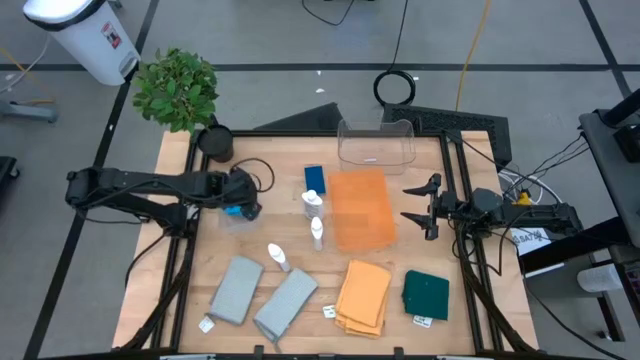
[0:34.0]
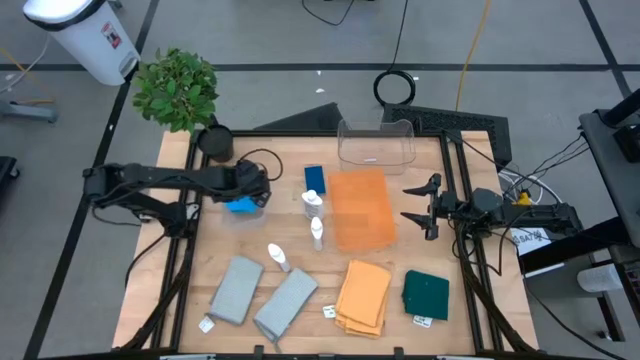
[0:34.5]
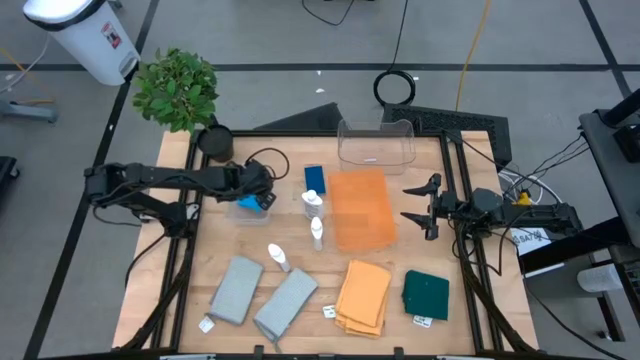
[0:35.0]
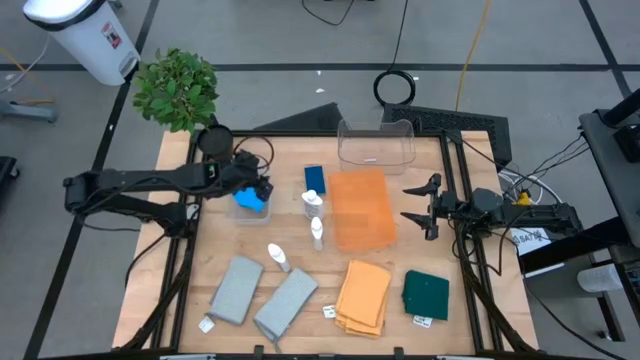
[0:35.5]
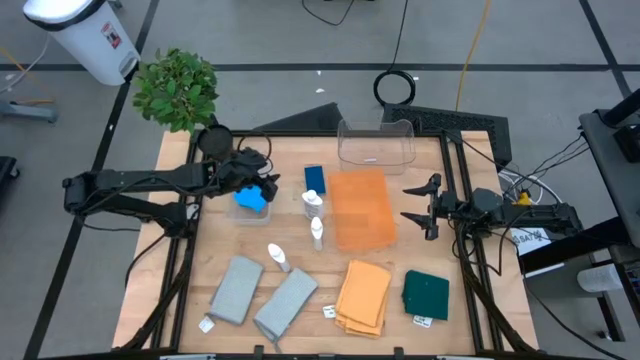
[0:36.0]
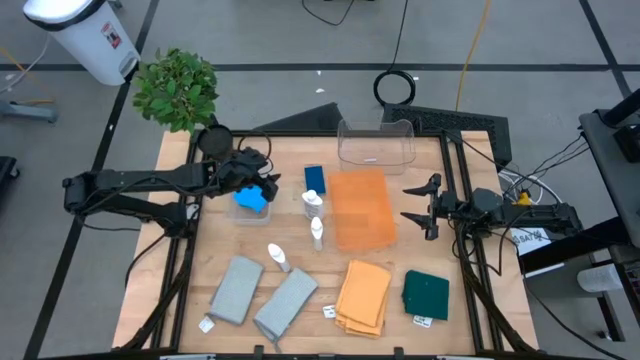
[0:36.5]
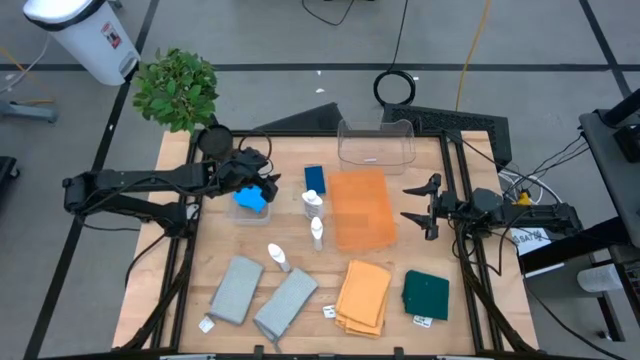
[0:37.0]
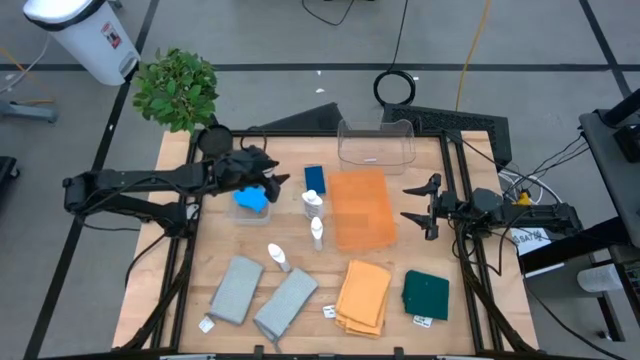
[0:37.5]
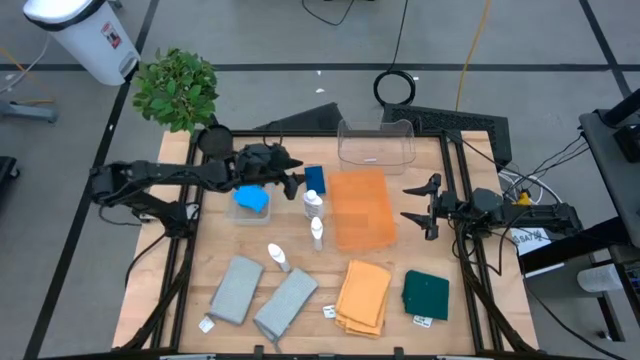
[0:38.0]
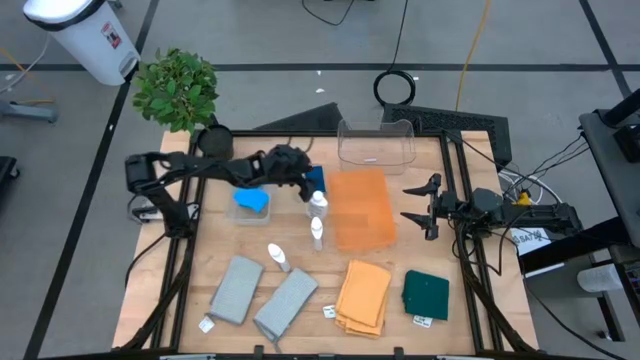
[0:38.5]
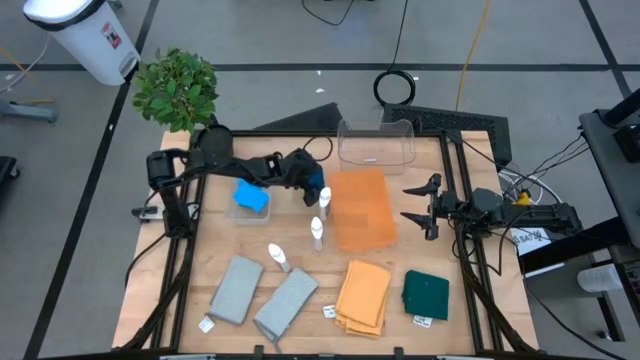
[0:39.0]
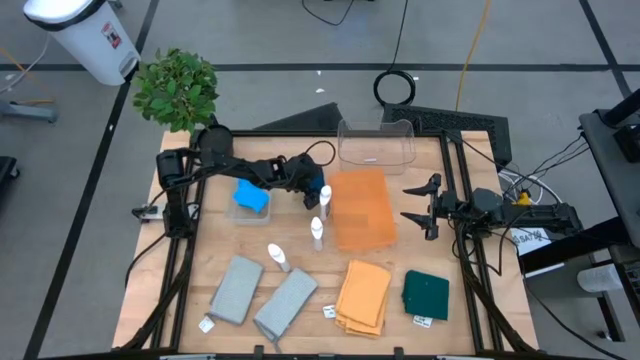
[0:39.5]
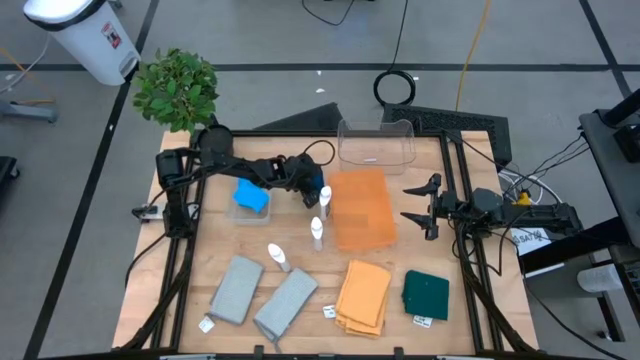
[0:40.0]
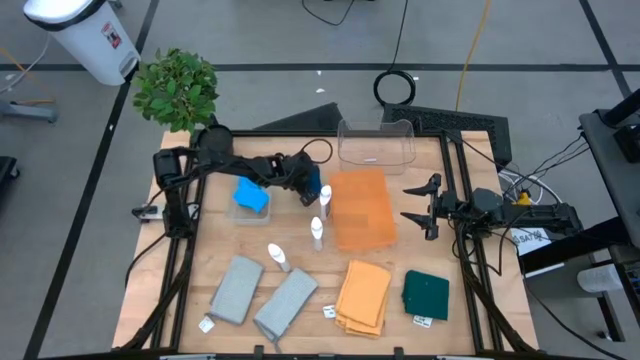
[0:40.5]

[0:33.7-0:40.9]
Task: Pick & Place Kitchen Items
Put the blue sponge into the white bin

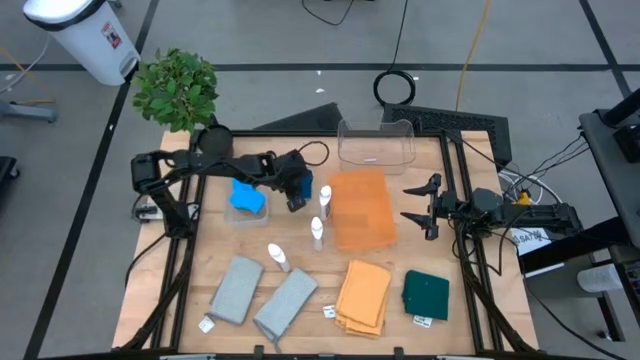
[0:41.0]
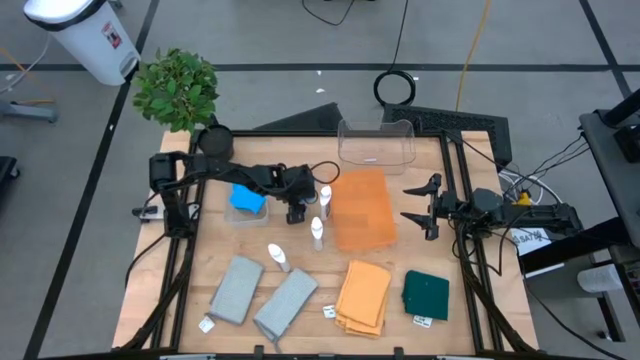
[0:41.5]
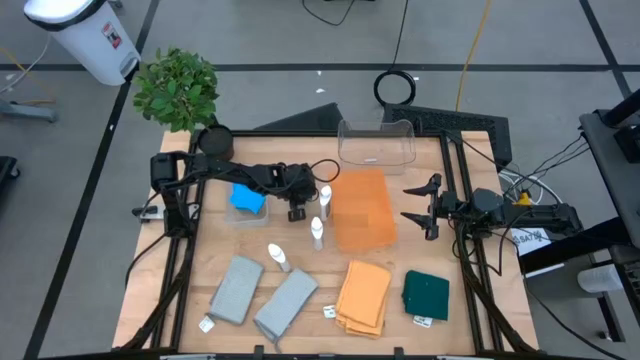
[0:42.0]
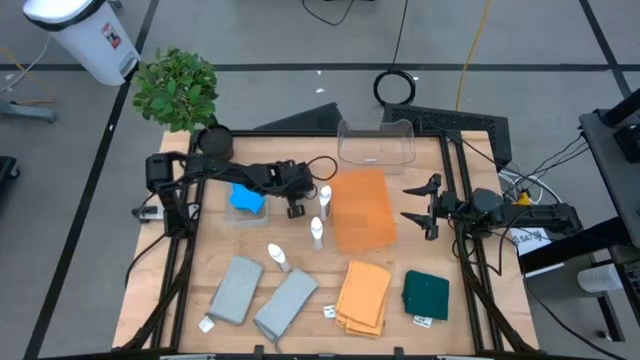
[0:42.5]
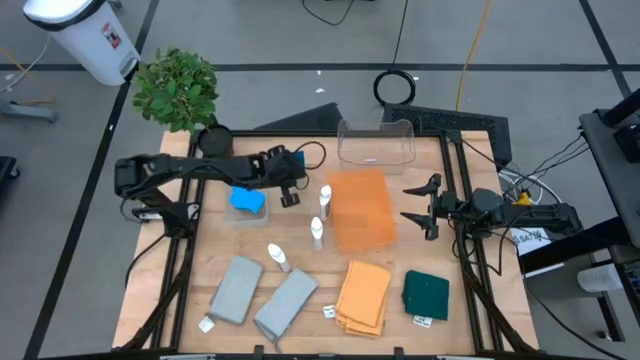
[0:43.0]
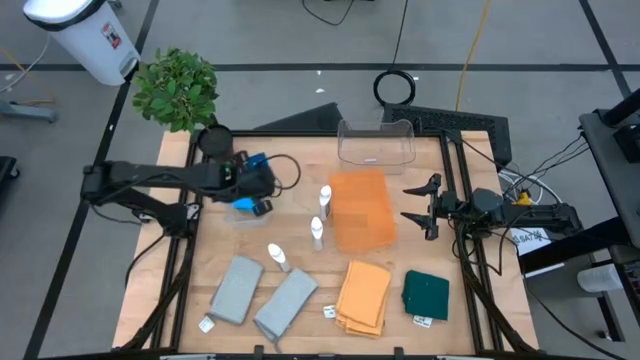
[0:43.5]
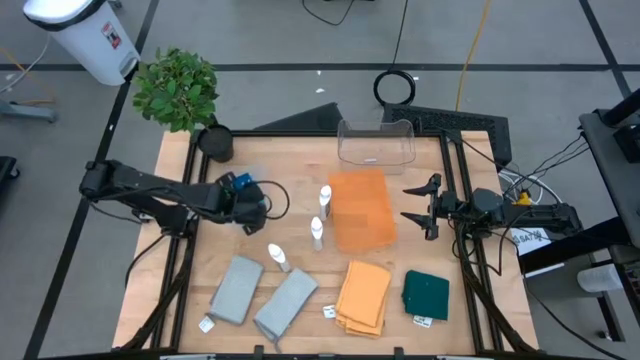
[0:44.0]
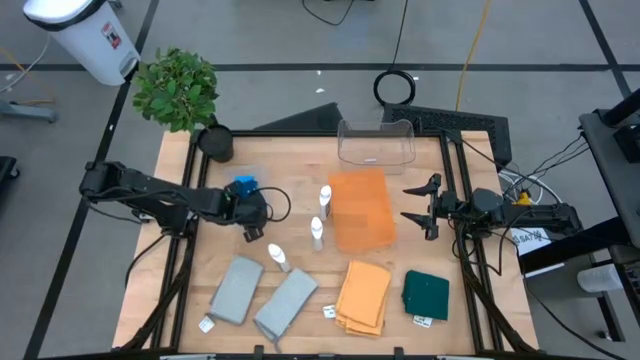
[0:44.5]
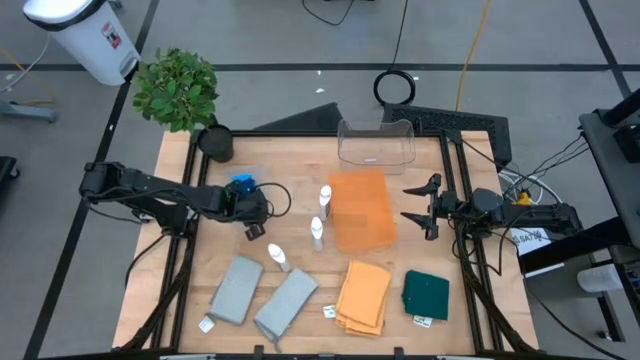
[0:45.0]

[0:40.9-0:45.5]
Put the blue sponge into the white bin

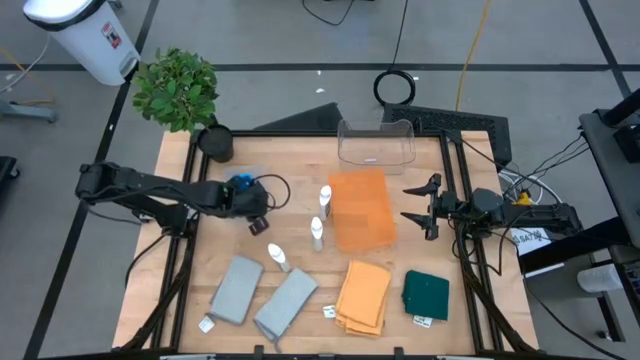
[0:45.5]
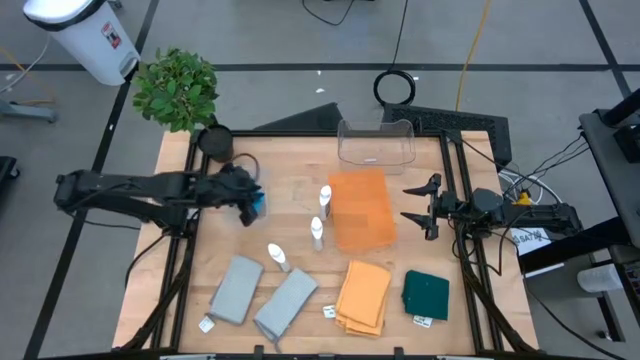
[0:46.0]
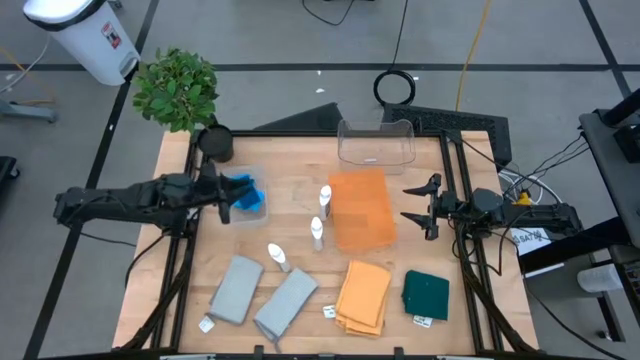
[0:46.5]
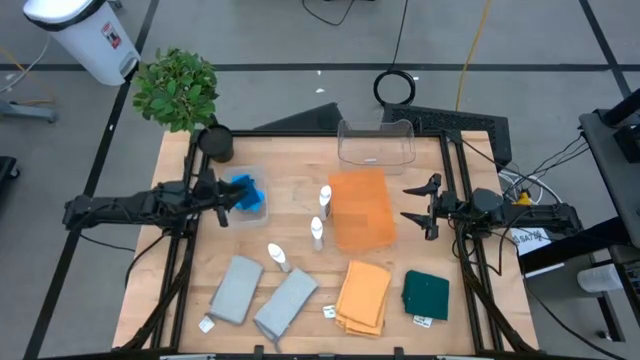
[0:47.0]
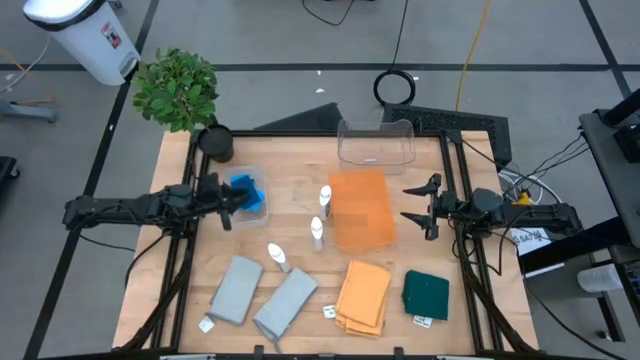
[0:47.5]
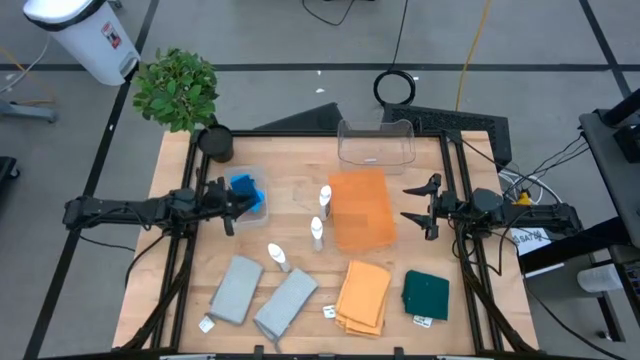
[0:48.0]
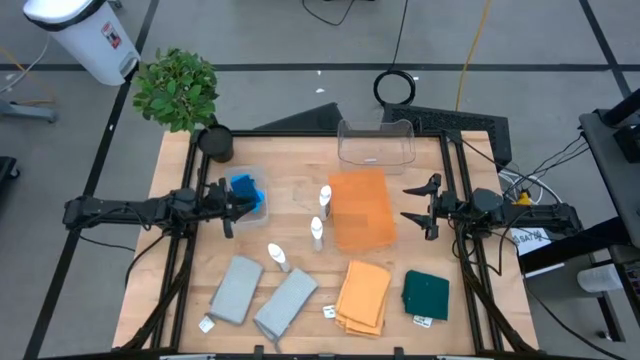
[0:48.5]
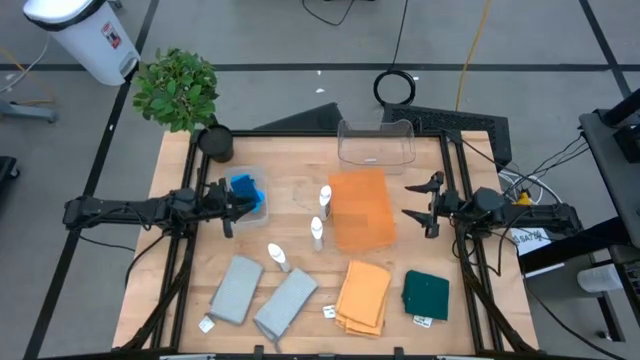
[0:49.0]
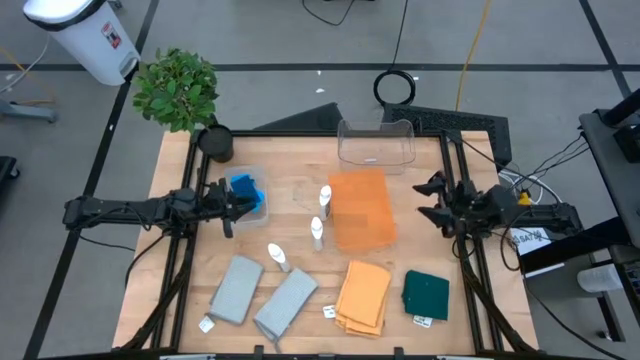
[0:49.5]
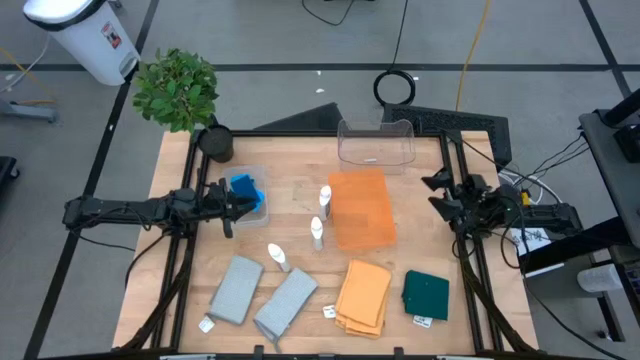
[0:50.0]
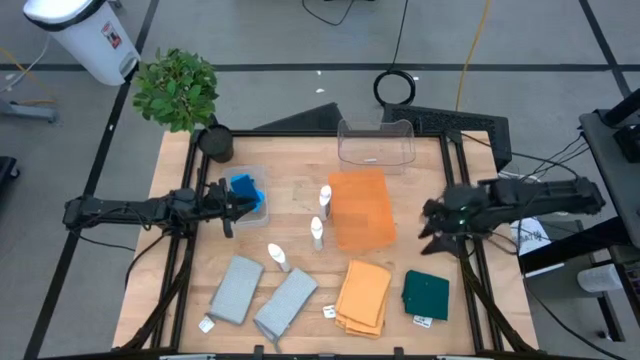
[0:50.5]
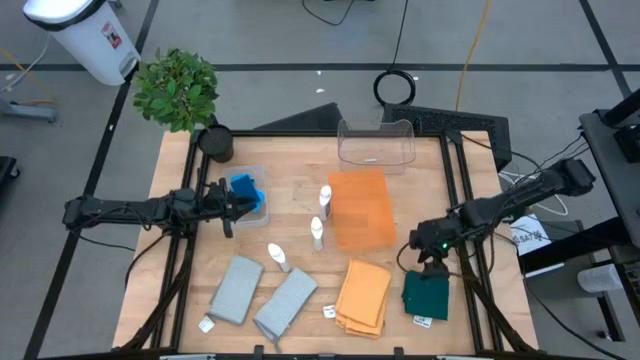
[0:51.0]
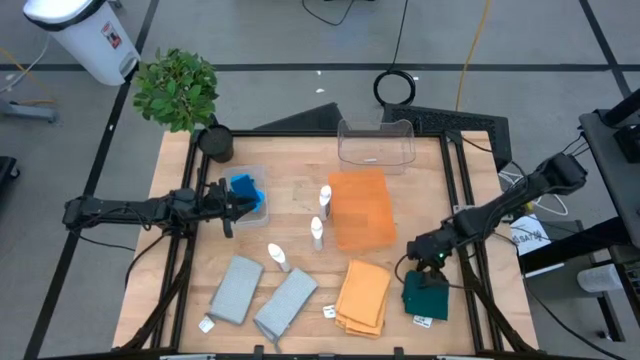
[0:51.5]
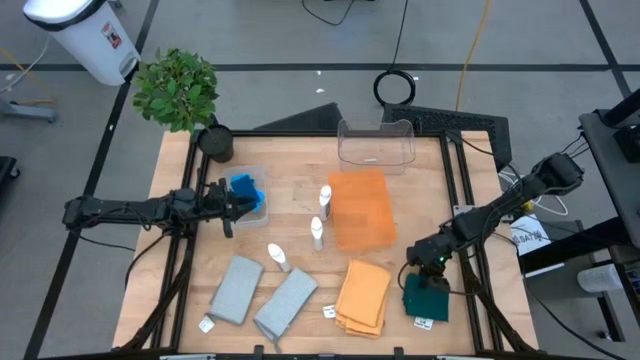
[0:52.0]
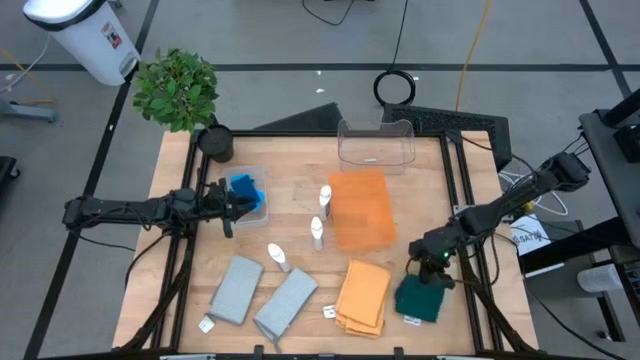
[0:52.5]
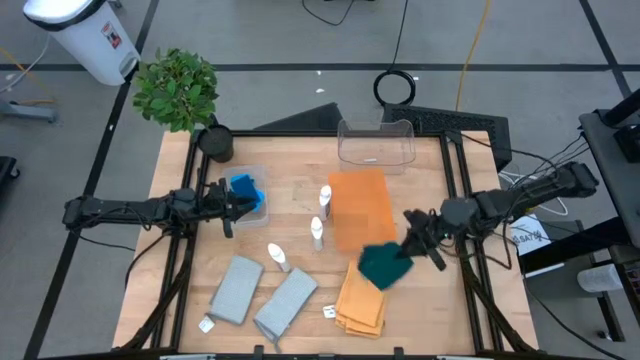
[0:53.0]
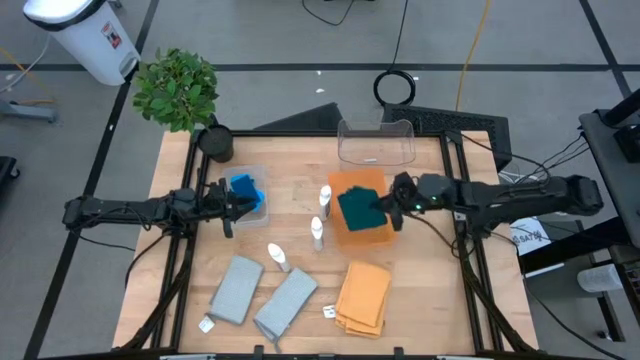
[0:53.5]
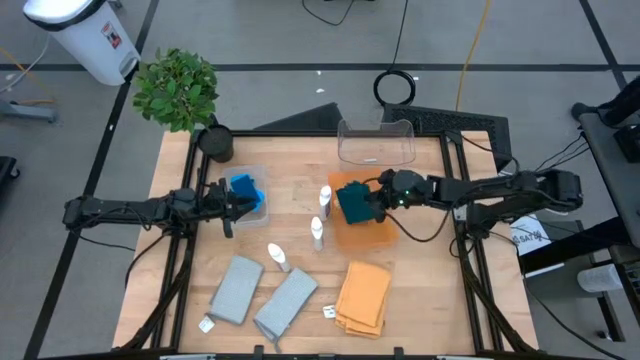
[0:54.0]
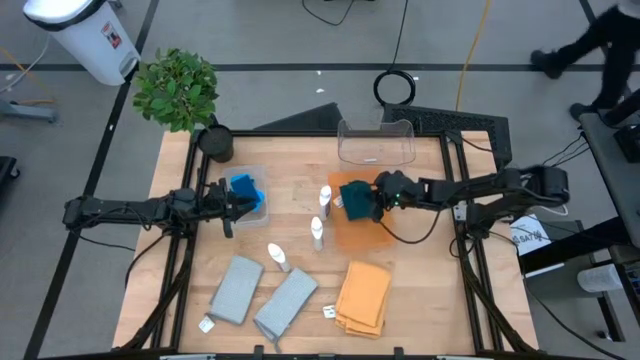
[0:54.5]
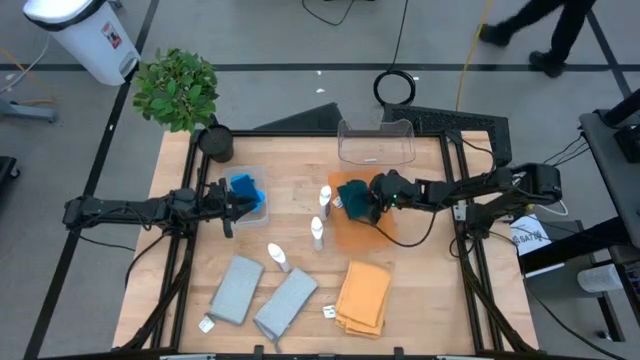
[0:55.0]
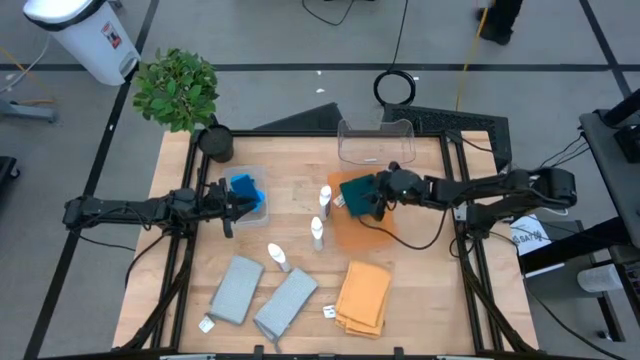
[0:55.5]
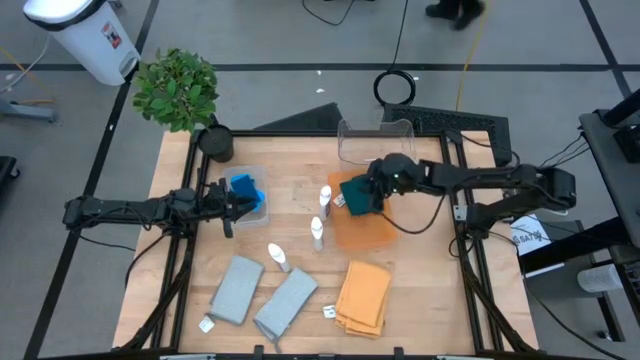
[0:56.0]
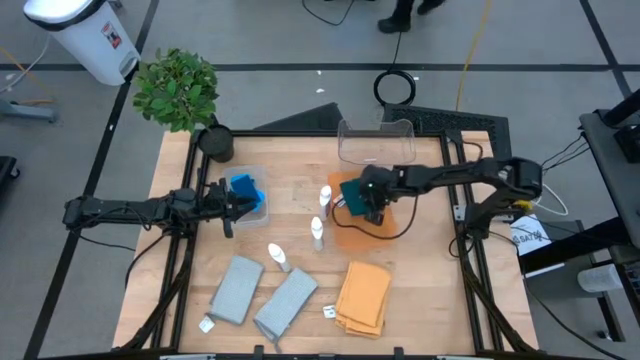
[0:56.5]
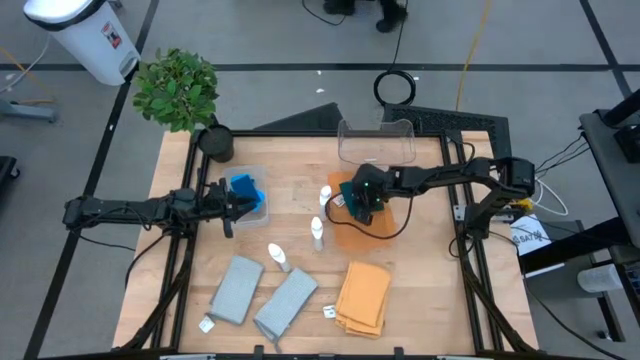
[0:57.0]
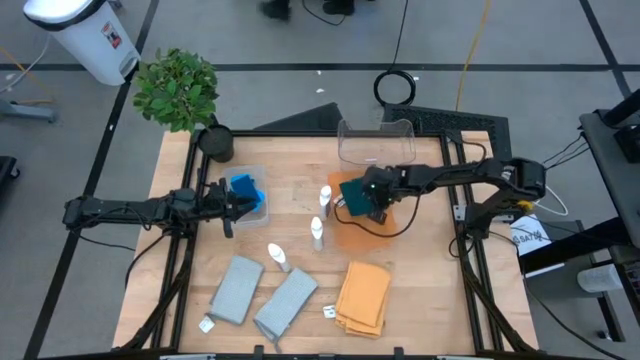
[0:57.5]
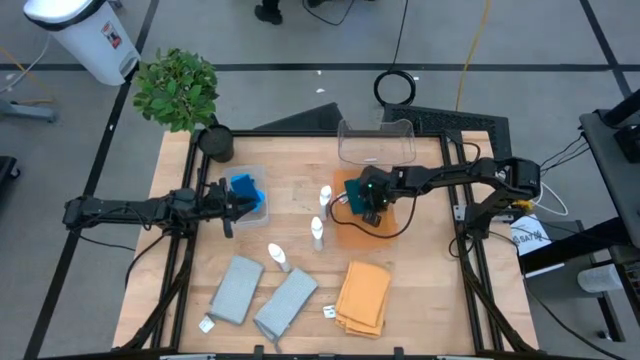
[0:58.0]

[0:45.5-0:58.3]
Put the green microfiber cloth into the orange bin
